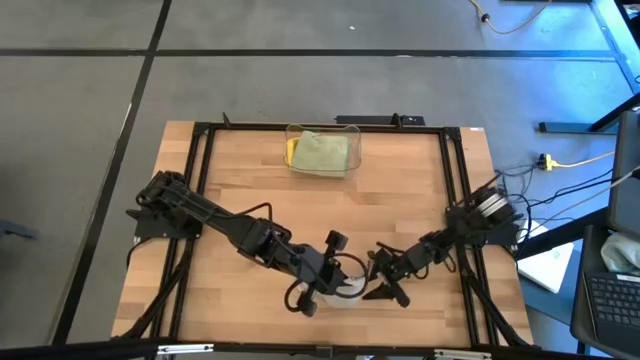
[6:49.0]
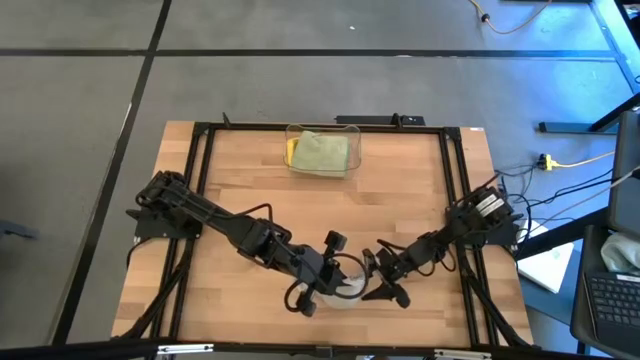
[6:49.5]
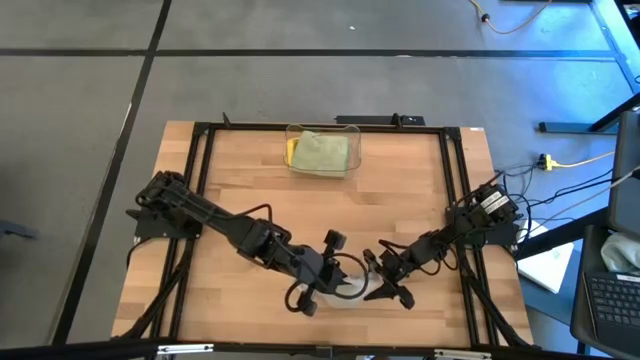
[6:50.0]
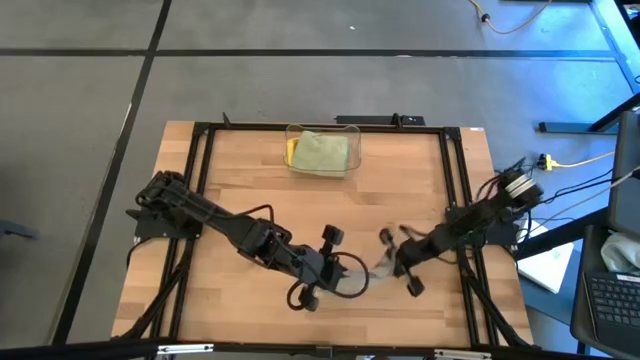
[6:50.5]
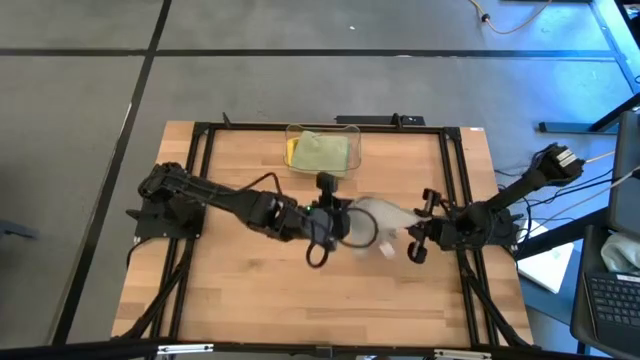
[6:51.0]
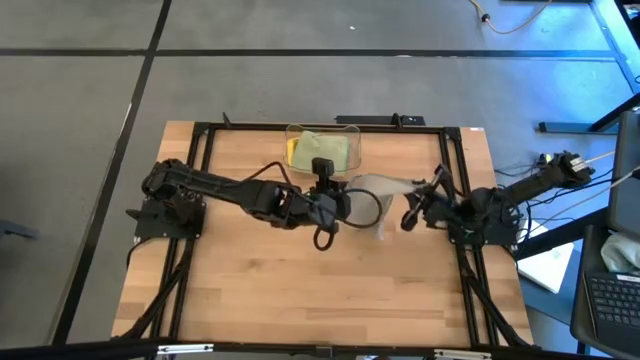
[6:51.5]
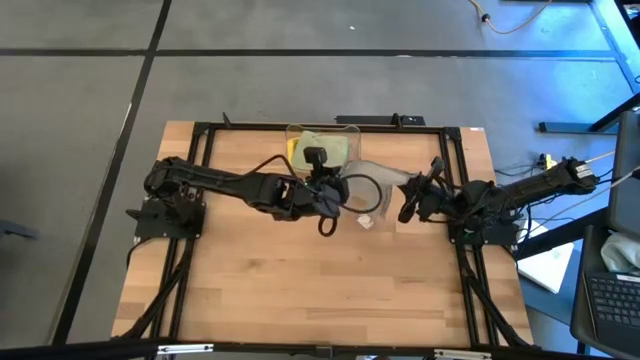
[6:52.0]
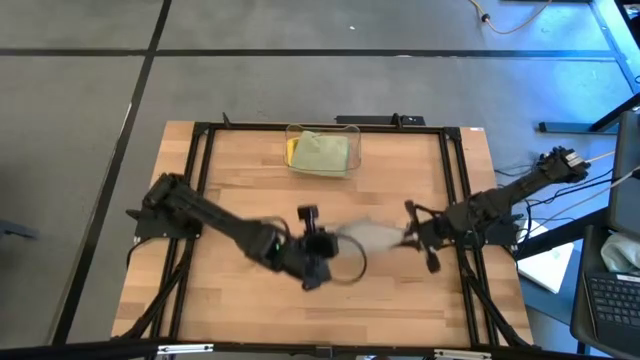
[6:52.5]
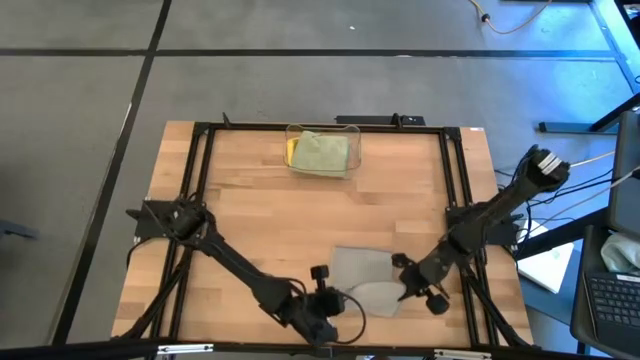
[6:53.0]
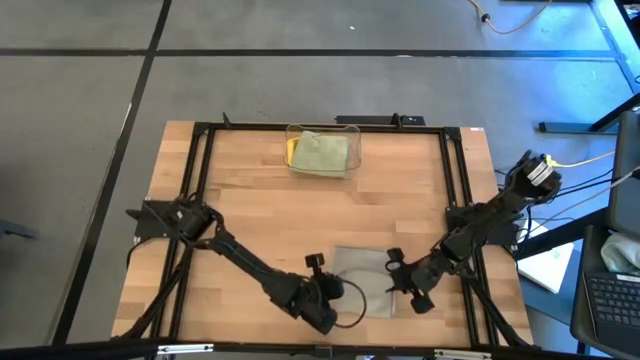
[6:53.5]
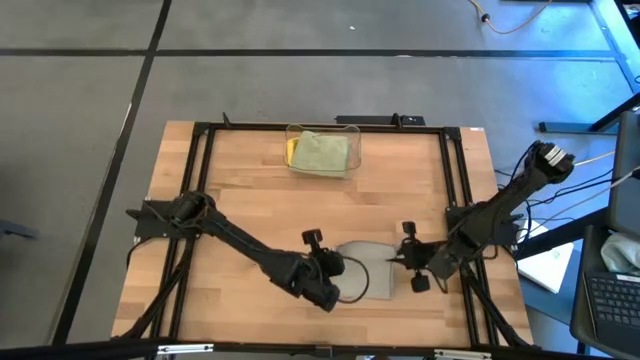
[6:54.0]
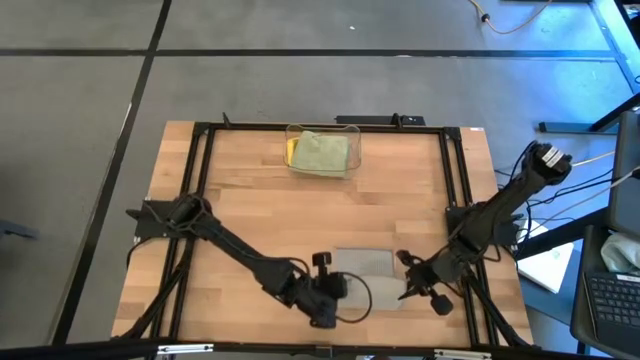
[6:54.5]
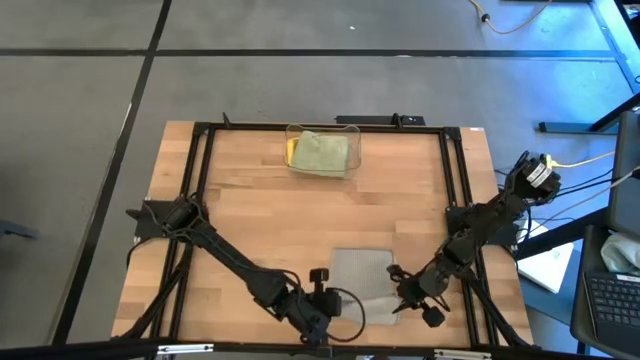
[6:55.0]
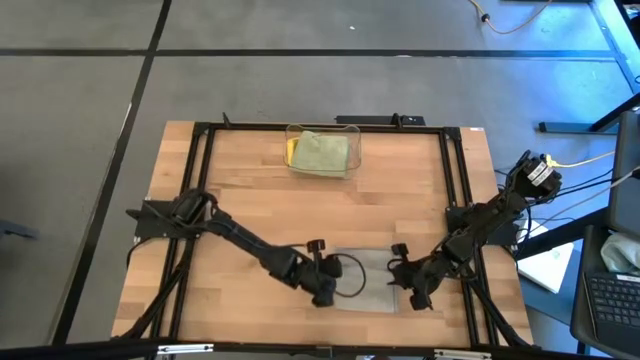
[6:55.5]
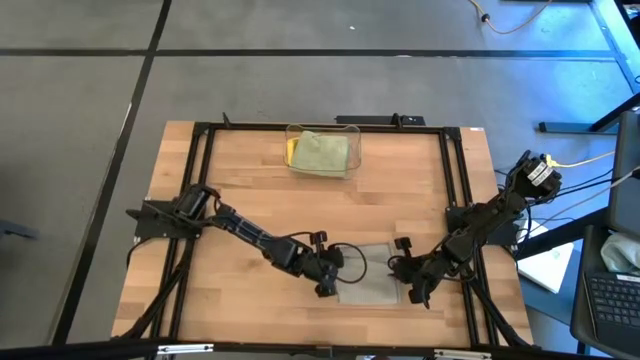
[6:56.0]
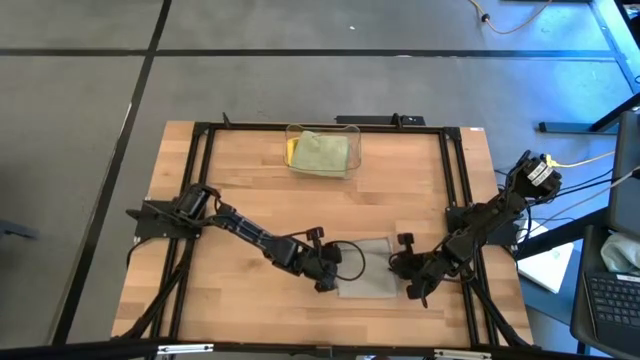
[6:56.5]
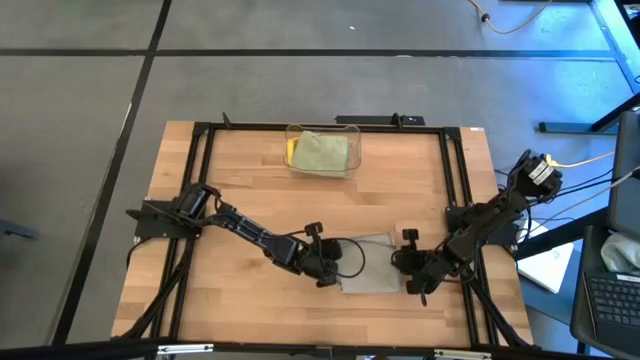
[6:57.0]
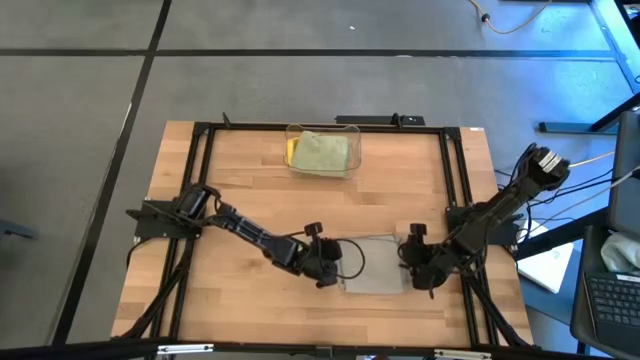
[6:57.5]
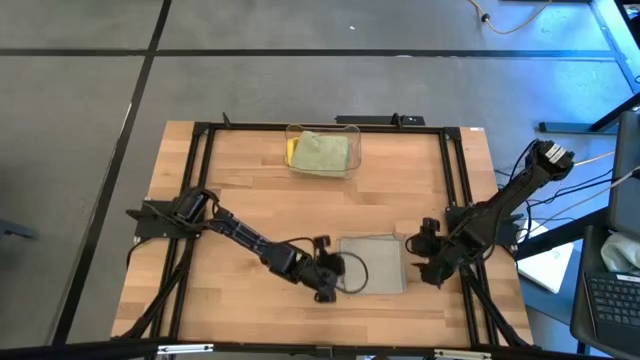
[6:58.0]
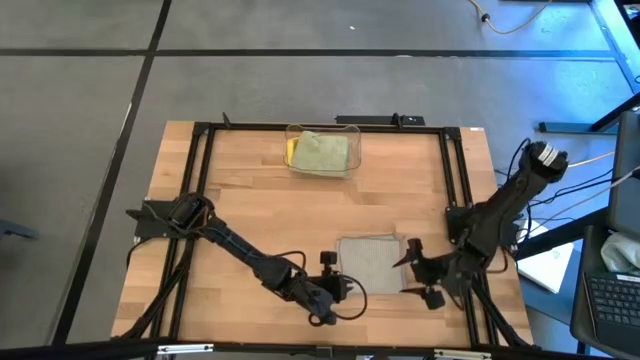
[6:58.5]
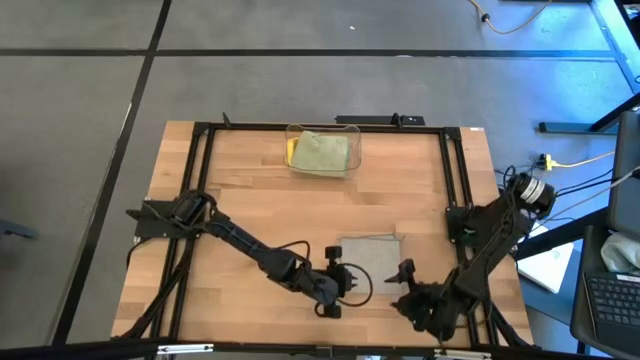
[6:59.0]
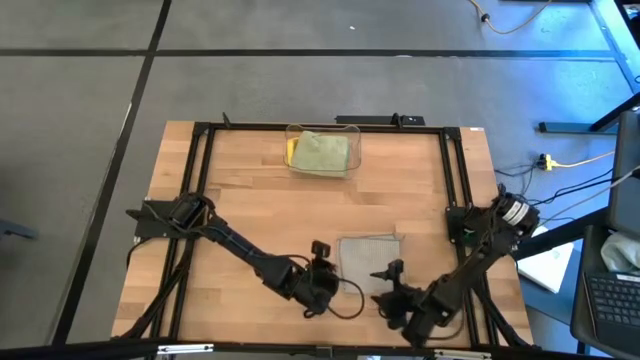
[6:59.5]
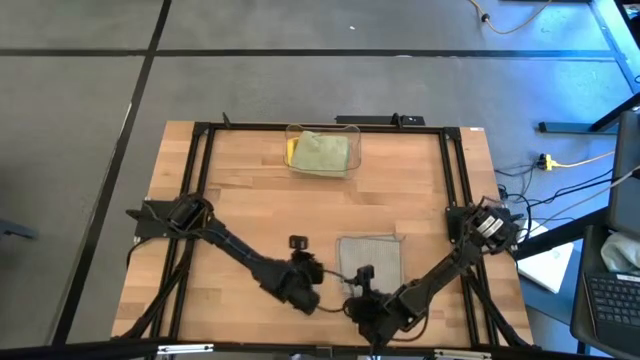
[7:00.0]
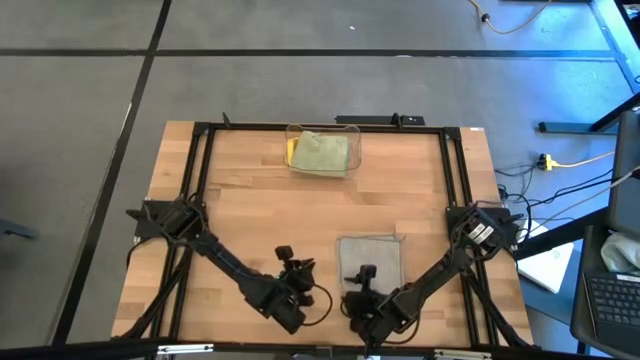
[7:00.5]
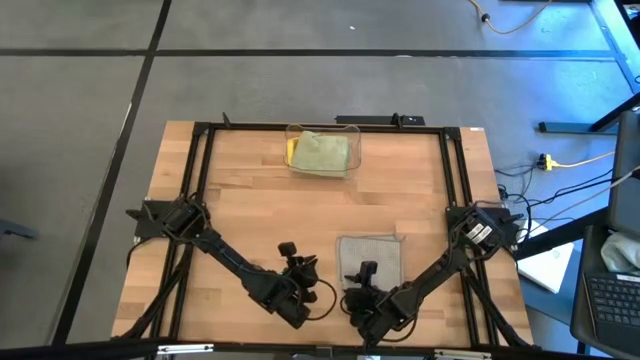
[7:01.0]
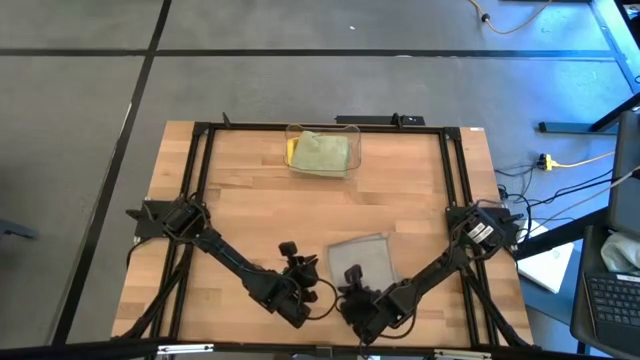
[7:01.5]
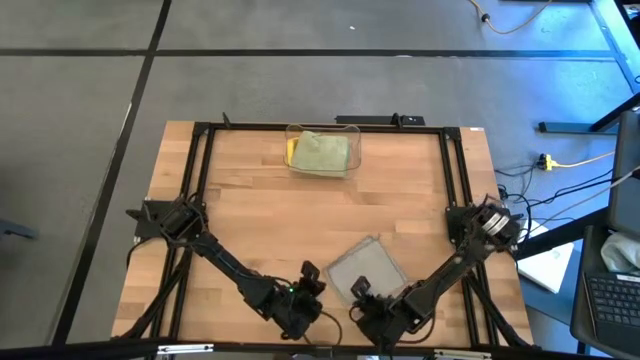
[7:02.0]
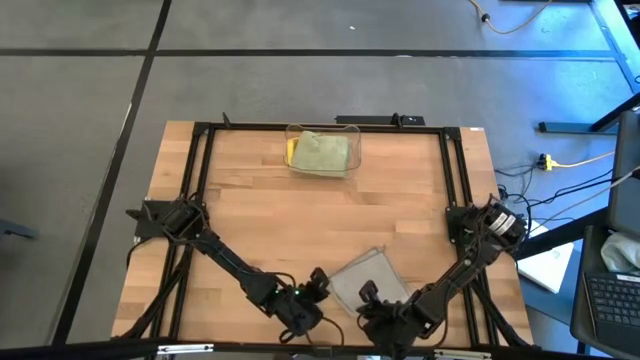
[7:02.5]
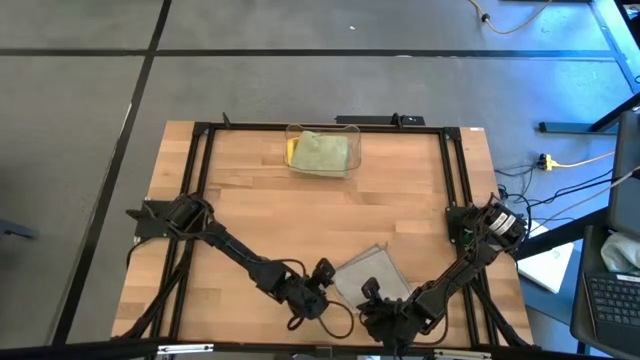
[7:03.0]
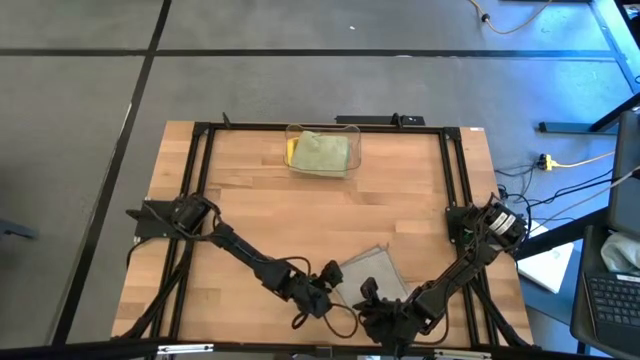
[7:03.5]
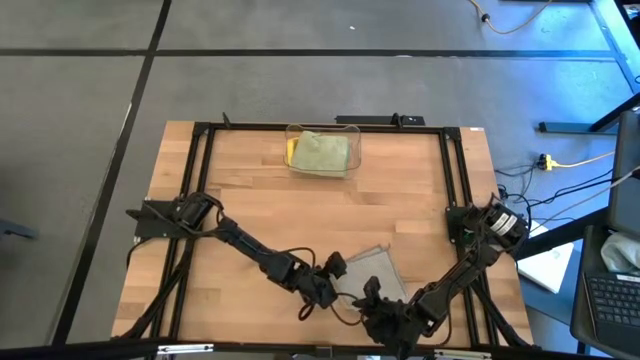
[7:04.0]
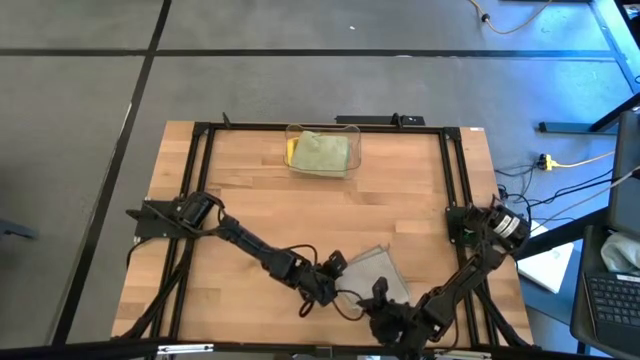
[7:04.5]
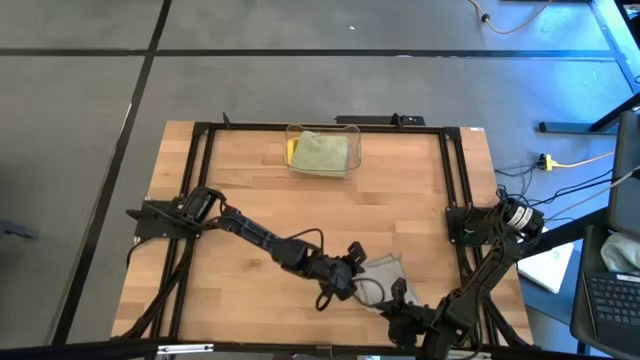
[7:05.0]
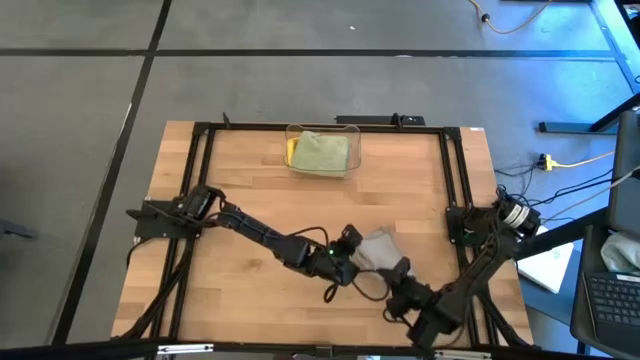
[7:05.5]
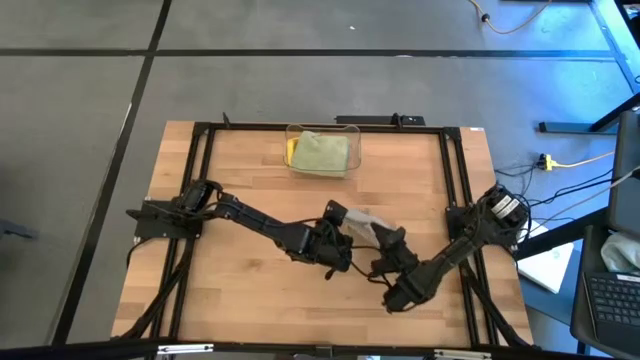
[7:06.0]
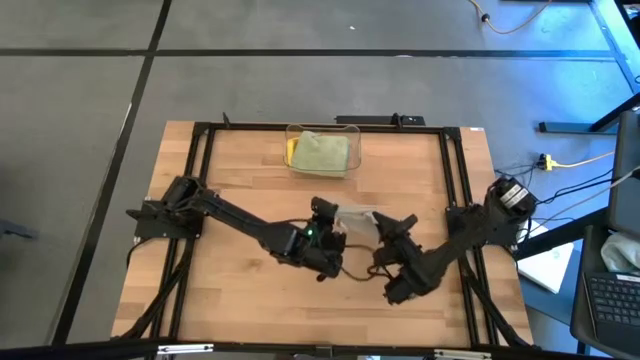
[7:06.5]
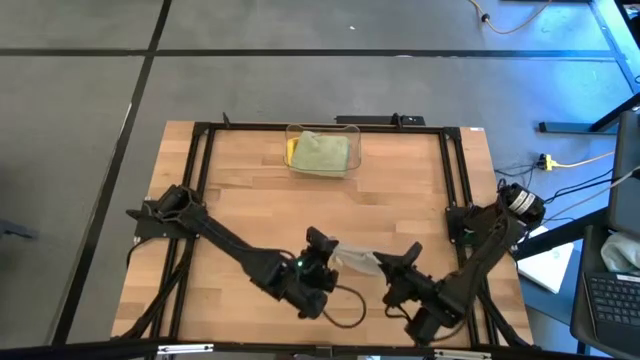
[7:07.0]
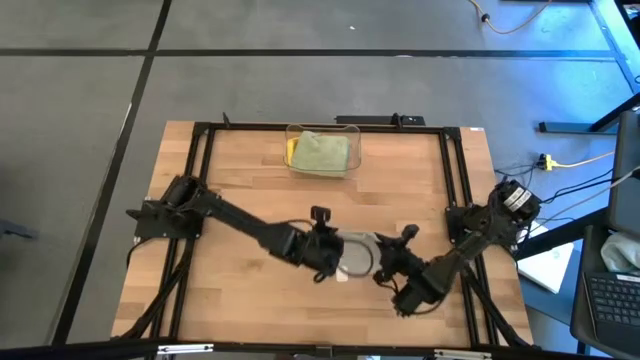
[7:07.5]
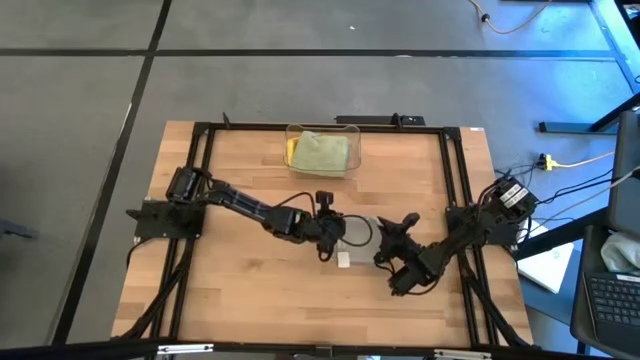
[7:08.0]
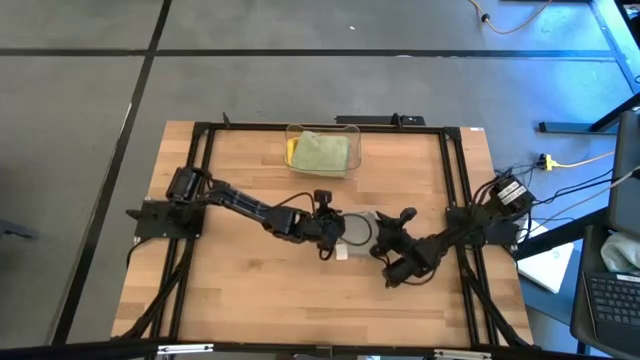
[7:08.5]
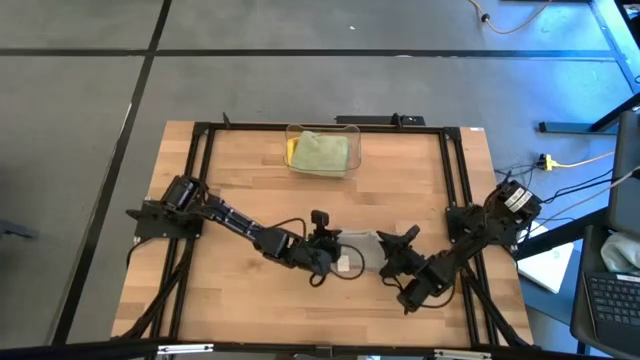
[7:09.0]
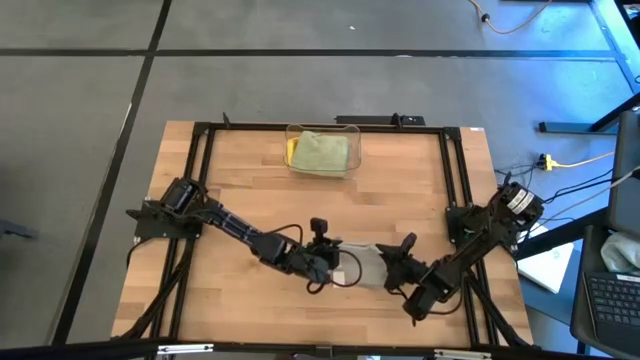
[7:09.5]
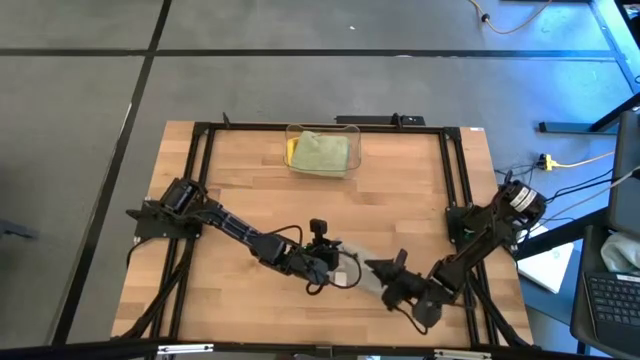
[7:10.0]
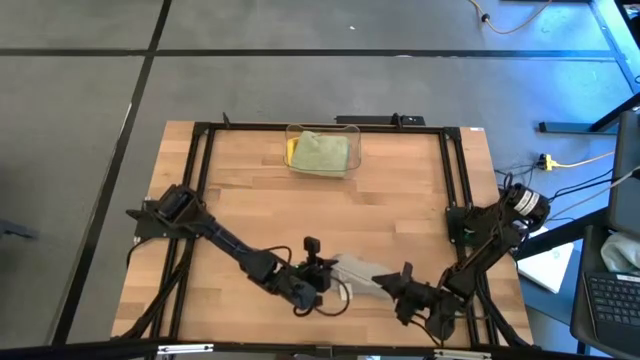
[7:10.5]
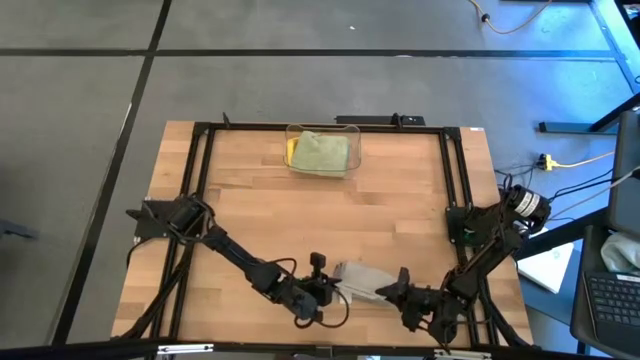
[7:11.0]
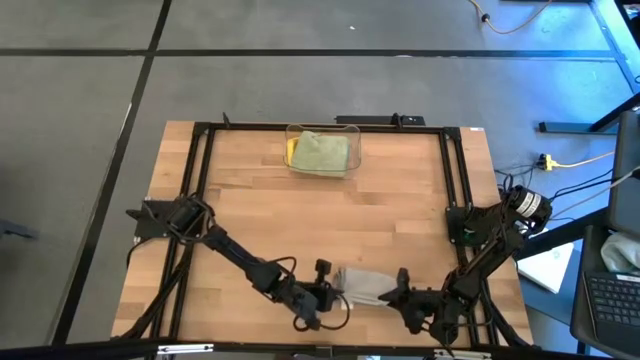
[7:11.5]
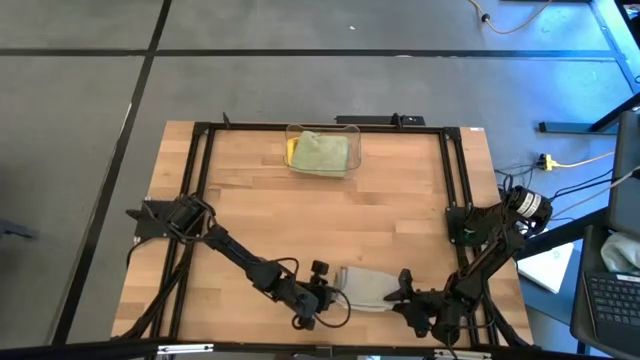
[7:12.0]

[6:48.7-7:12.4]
Task: Fold microfiber towels
Fold the gray microfiber cloth
